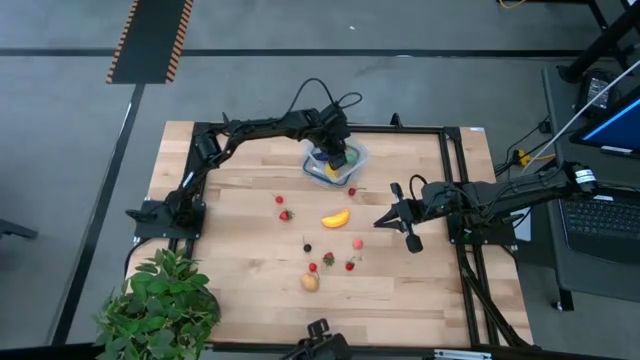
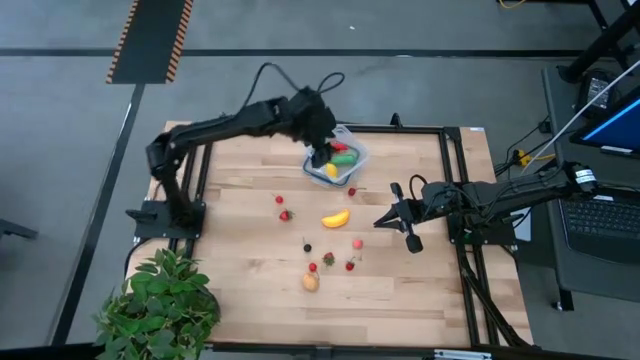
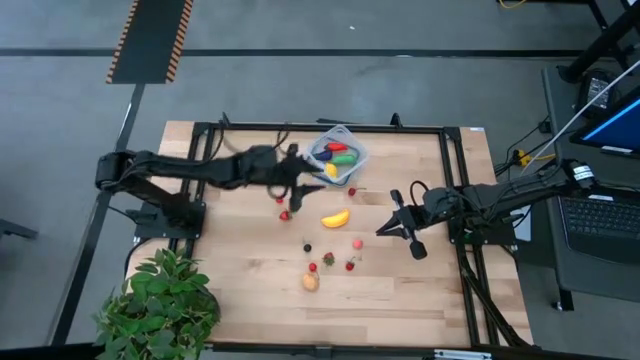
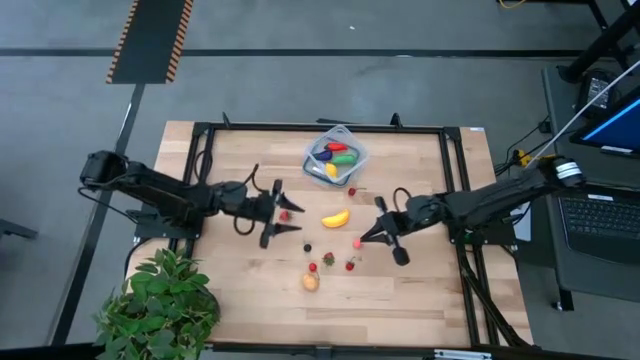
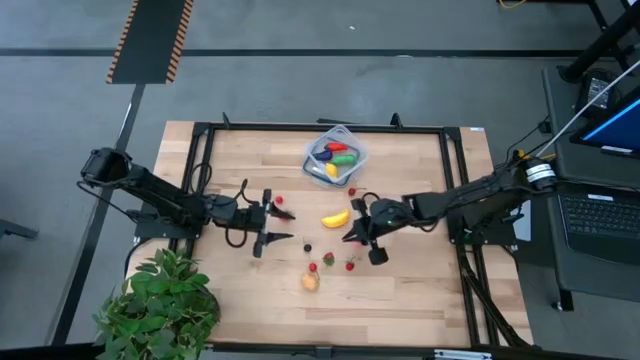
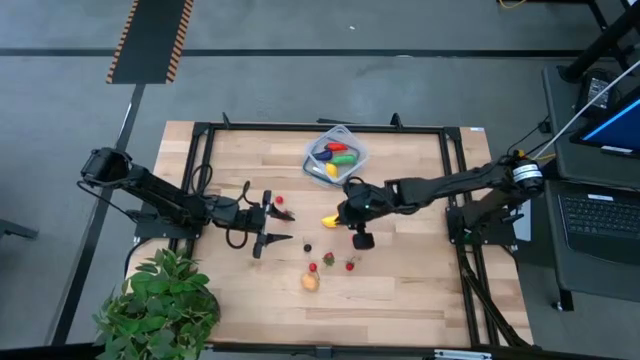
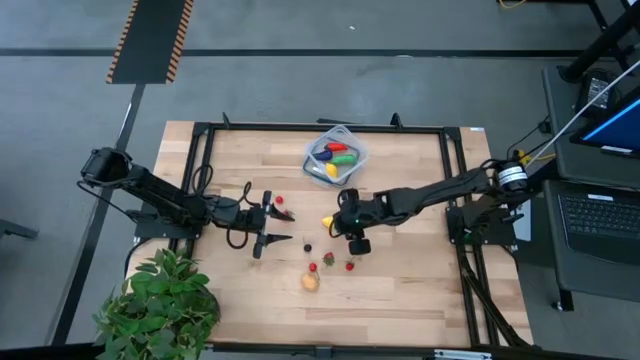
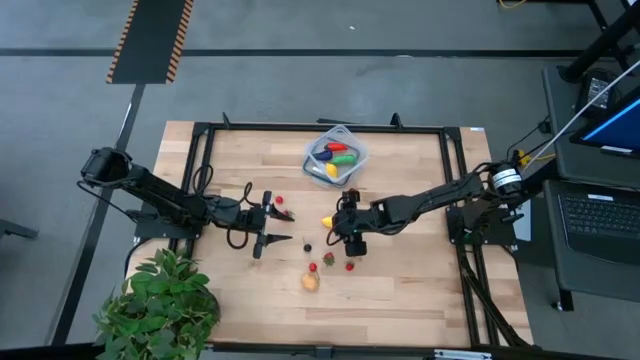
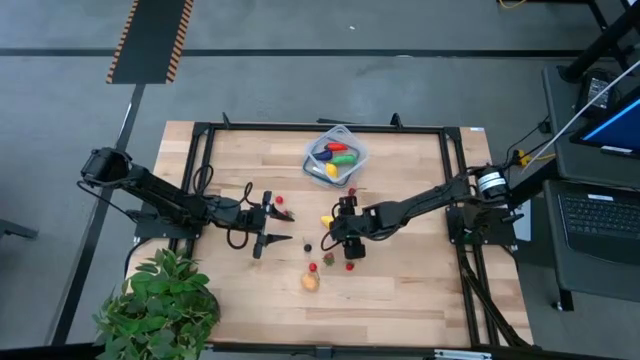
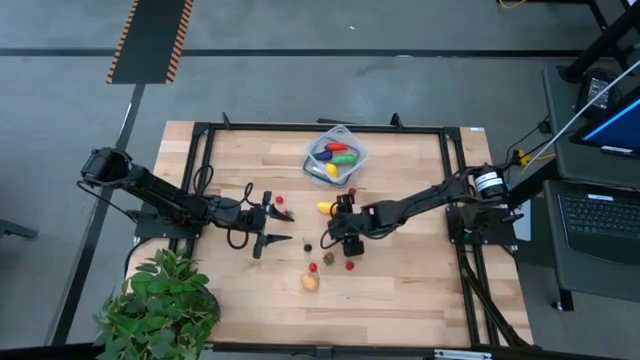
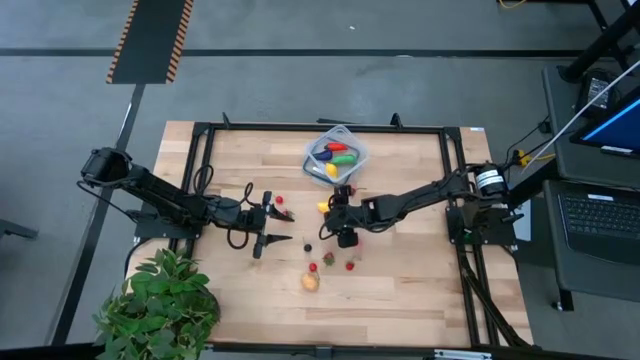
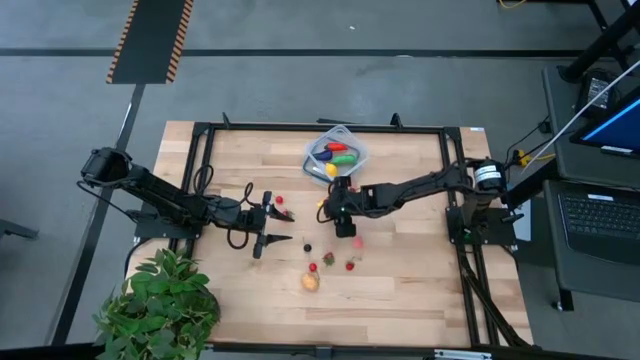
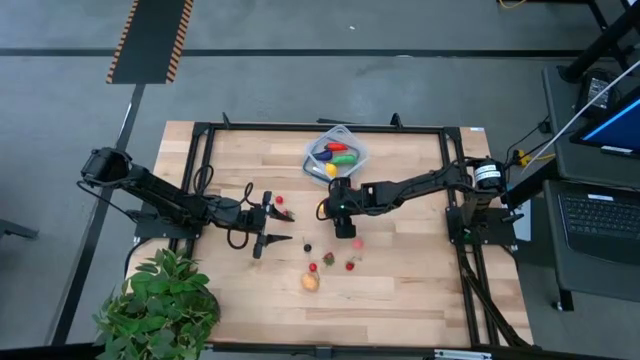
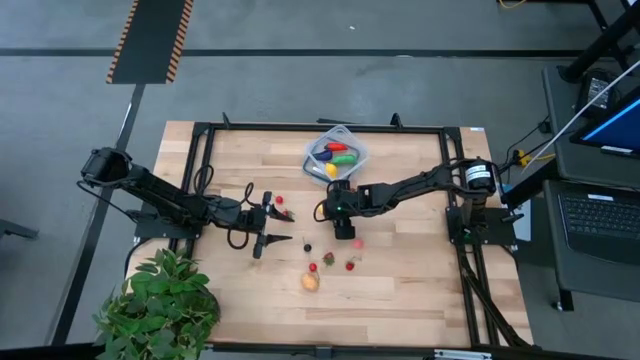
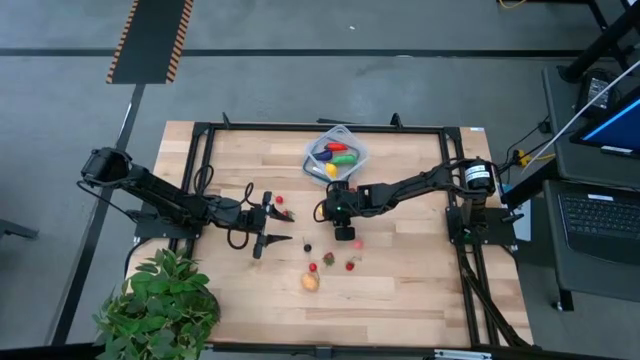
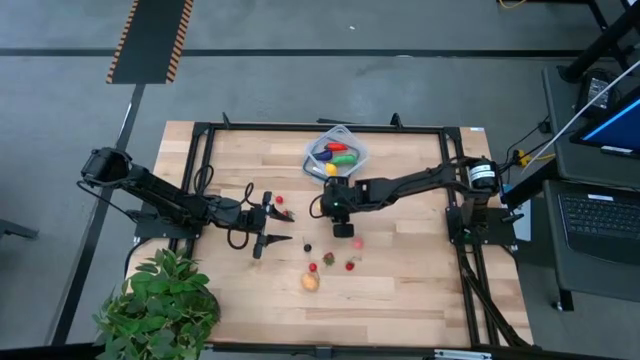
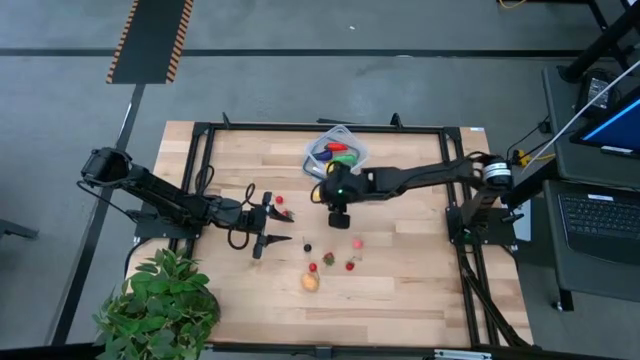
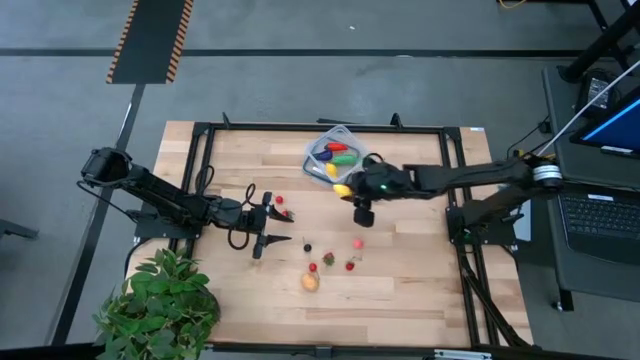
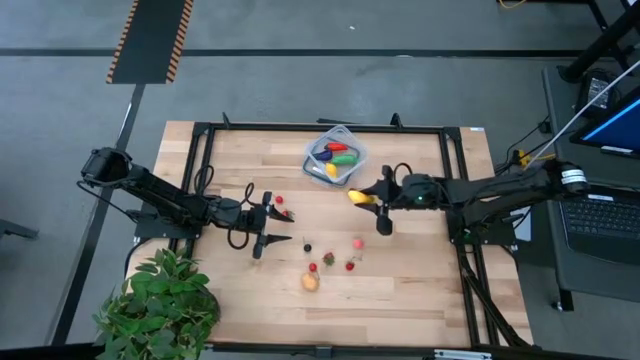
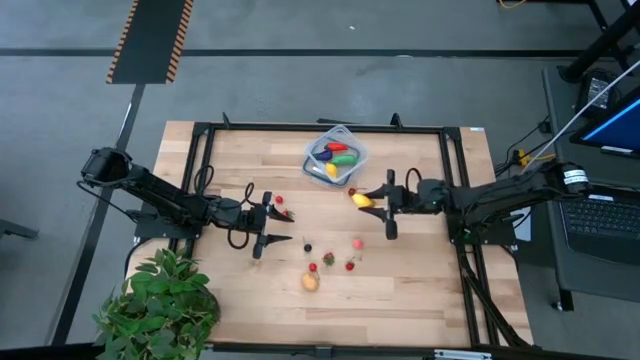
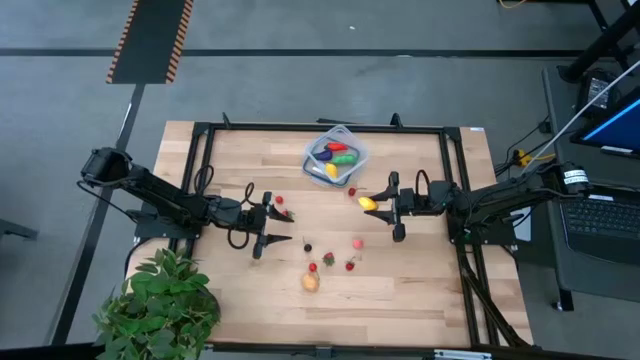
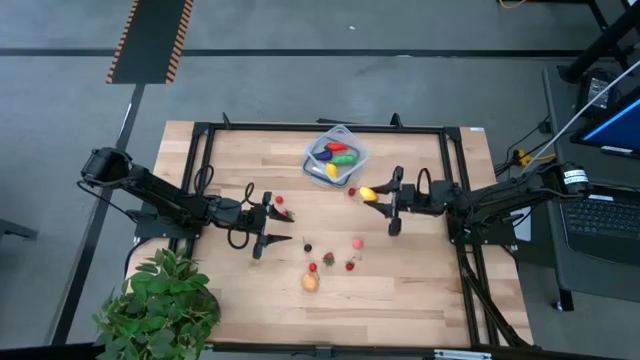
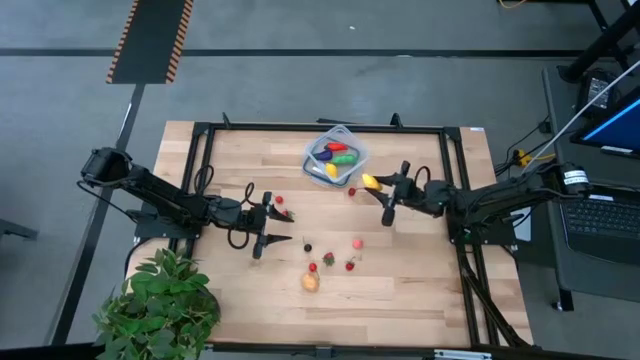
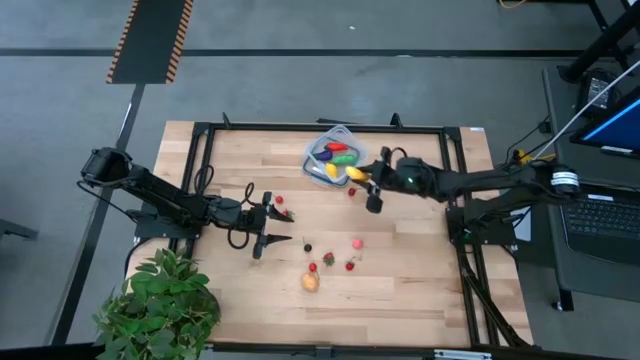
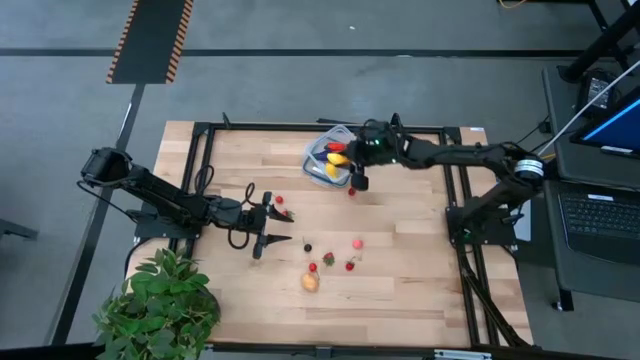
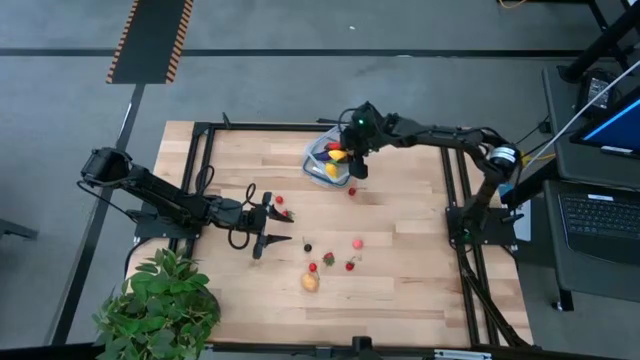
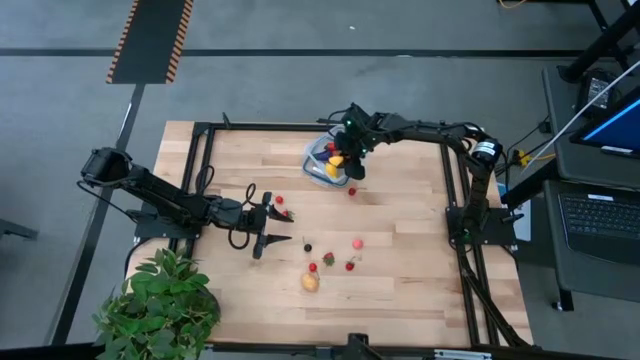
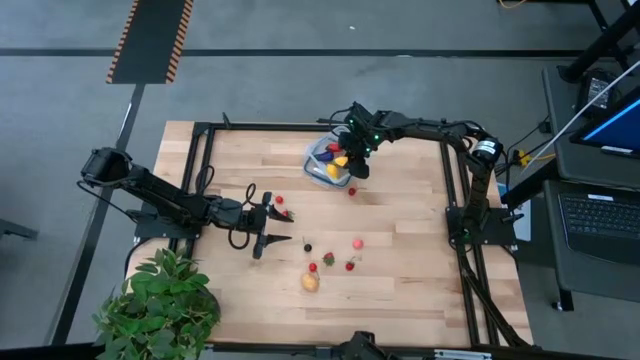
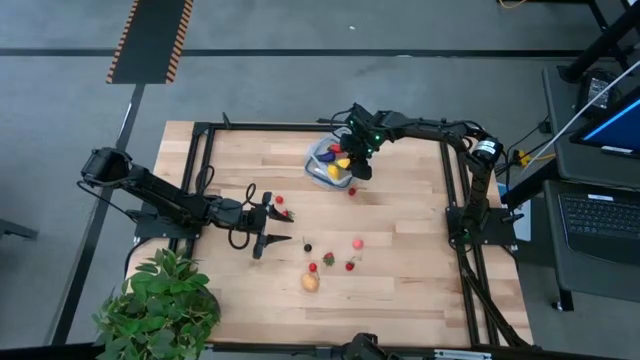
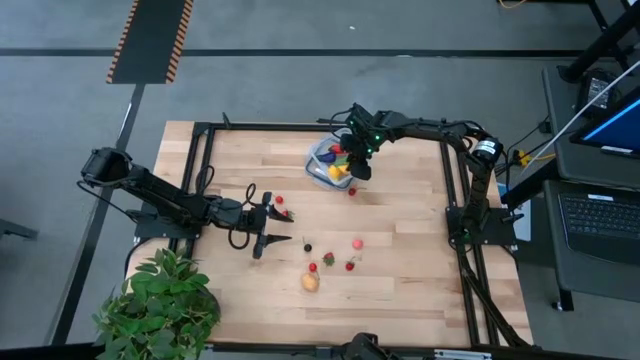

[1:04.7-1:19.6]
Task: Pick and placing Produce into tupperware
Put the yellow banana into the transparent container

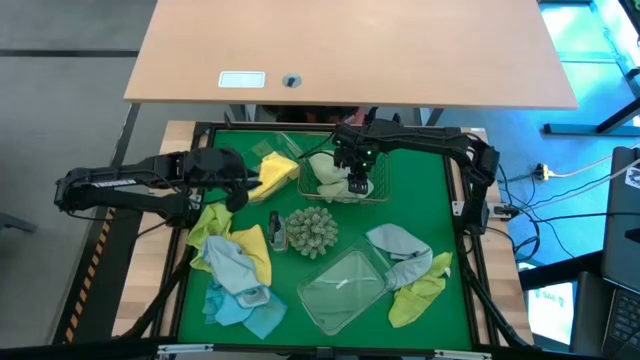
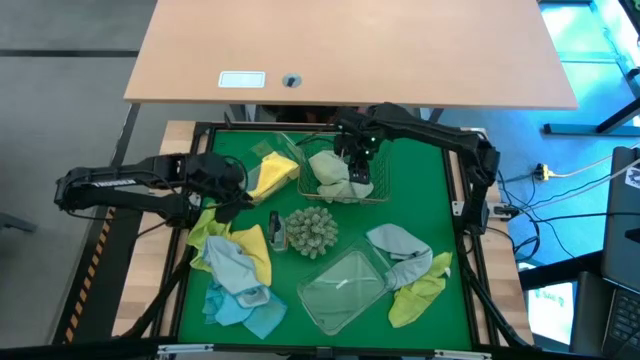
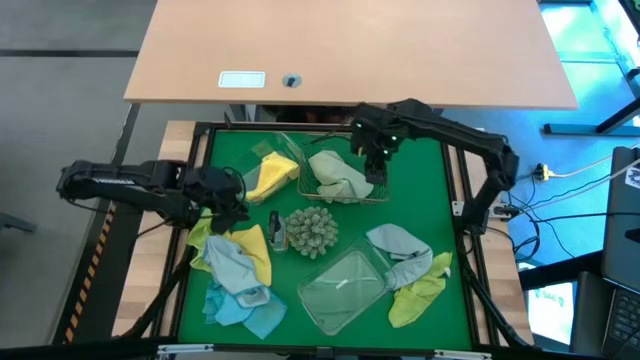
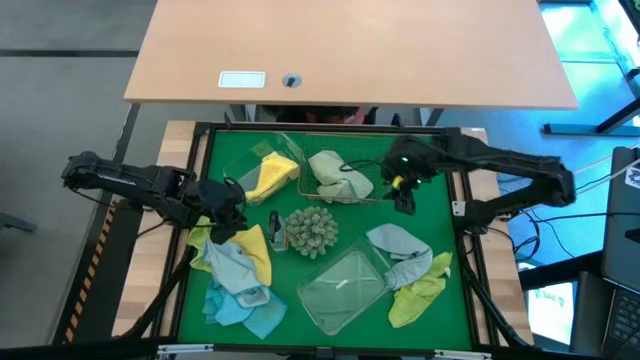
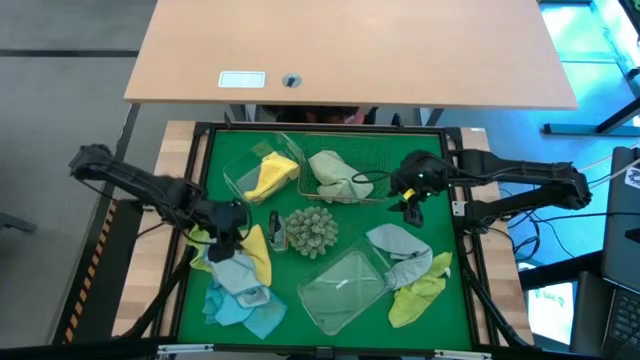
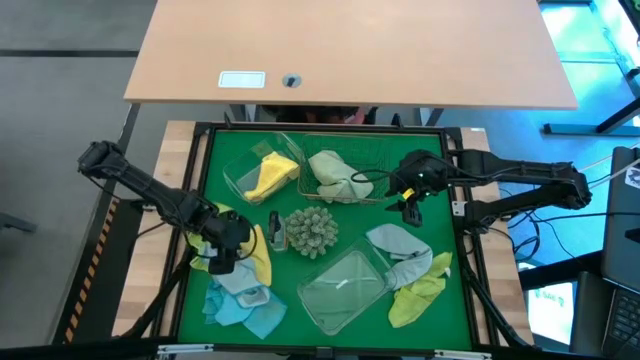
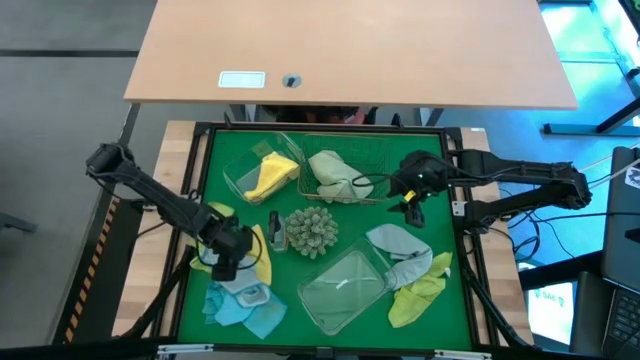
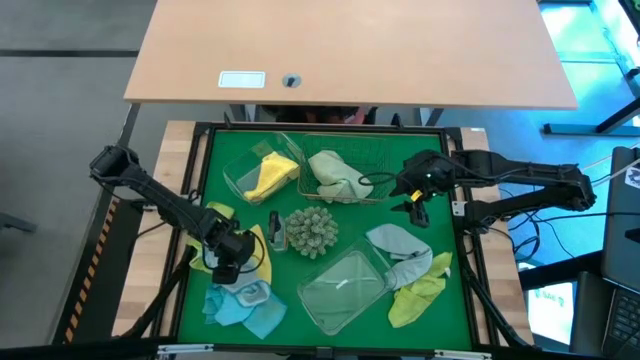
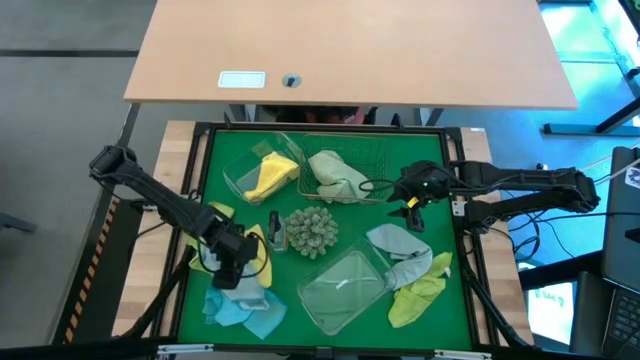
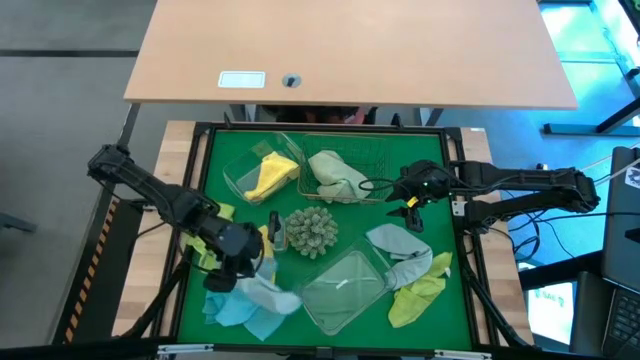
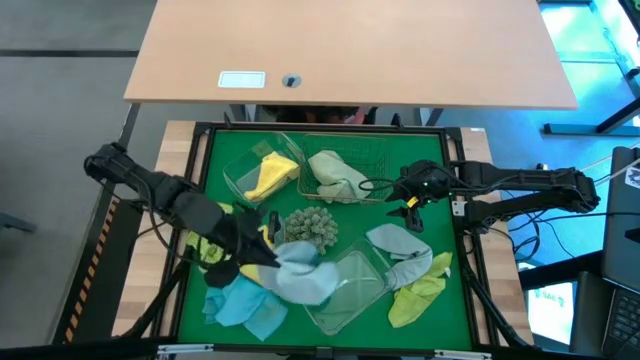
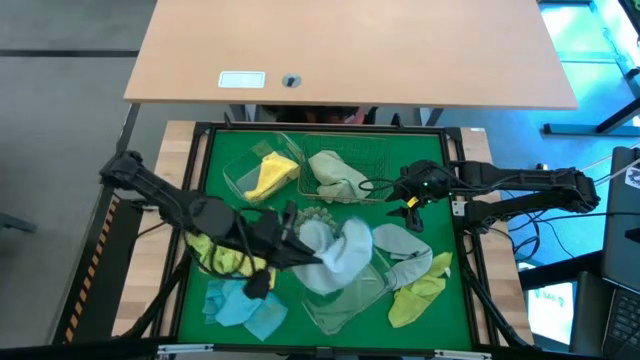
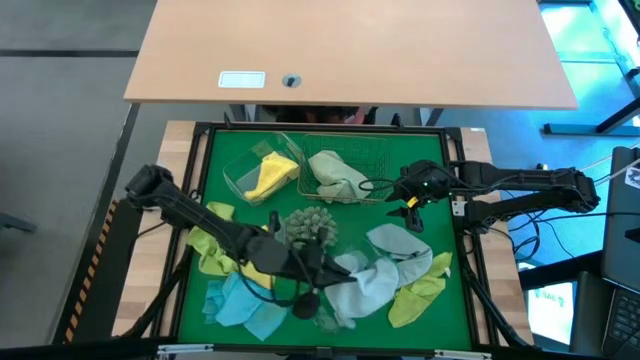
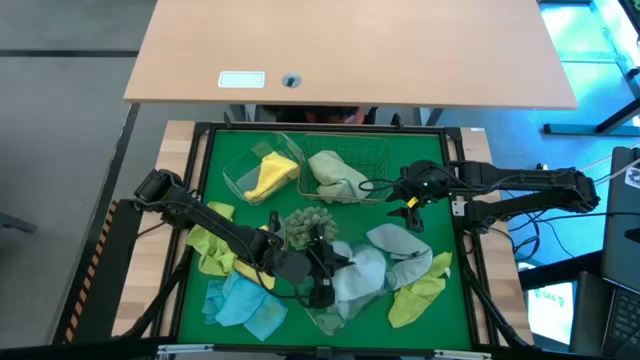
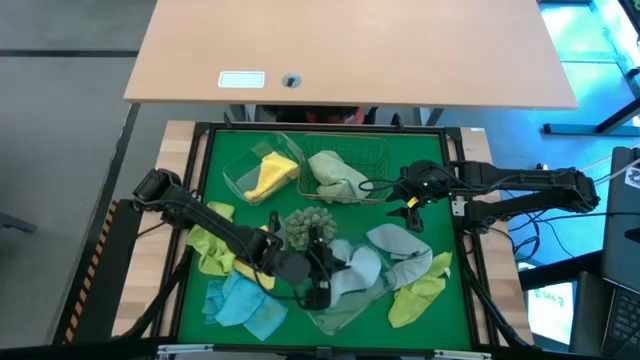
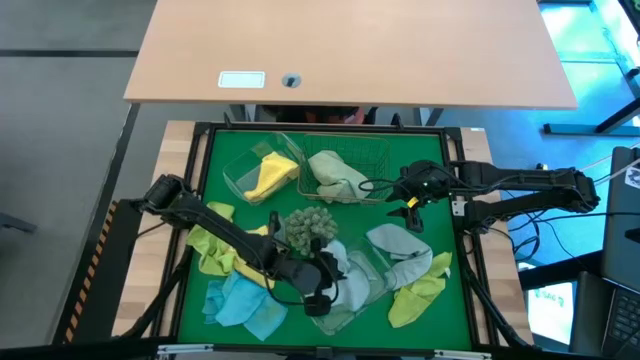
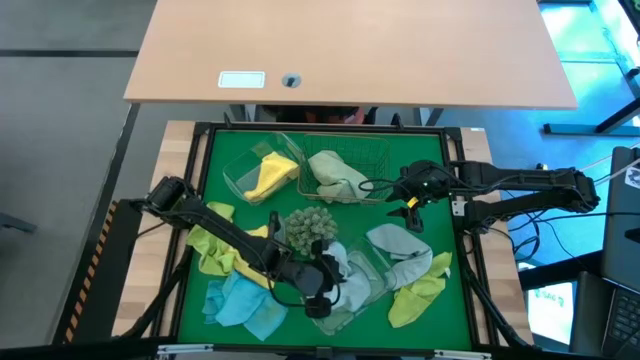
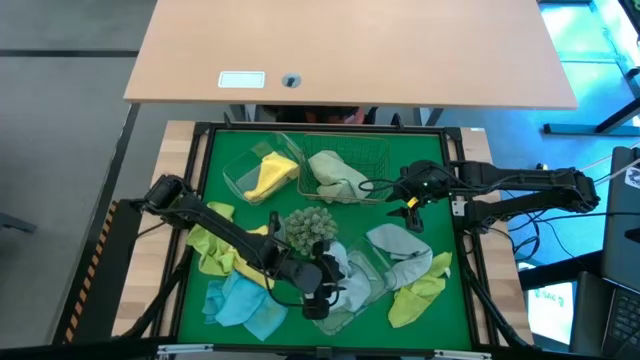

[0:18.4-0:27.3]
Task: Sort microfiber towel by color & place in baskets
Put the left light blue microfiber towel into the bottom transparent bin
